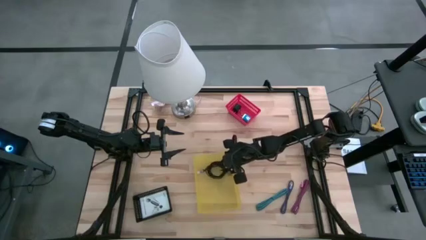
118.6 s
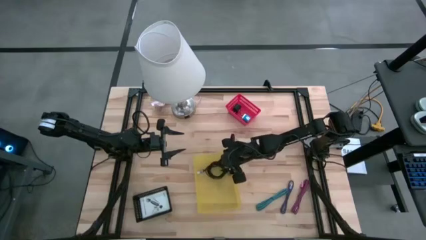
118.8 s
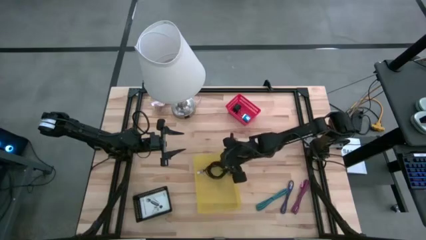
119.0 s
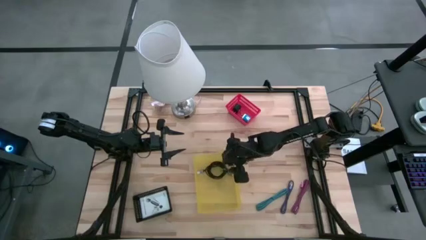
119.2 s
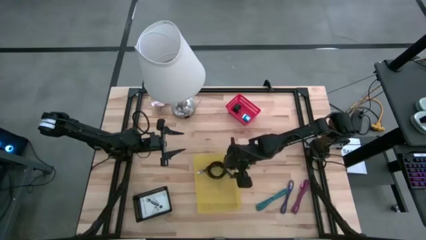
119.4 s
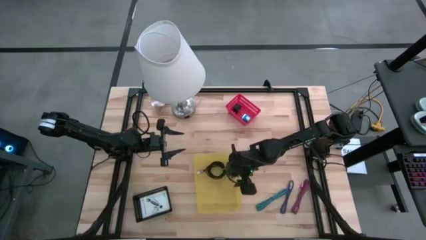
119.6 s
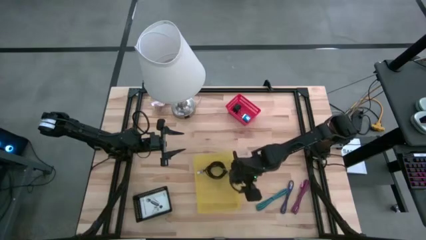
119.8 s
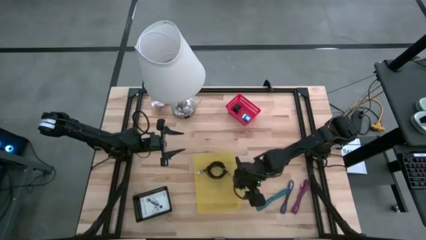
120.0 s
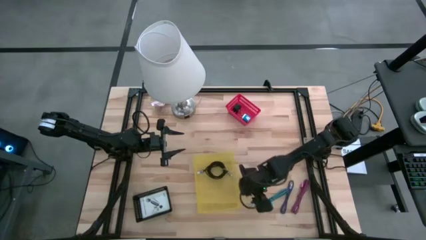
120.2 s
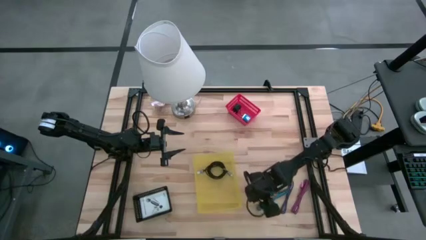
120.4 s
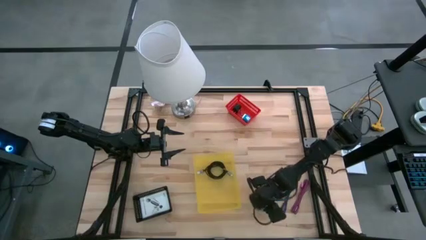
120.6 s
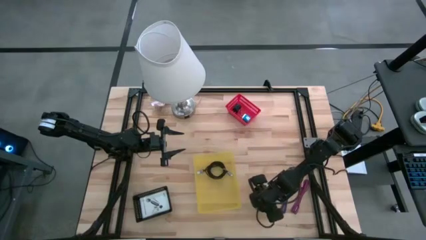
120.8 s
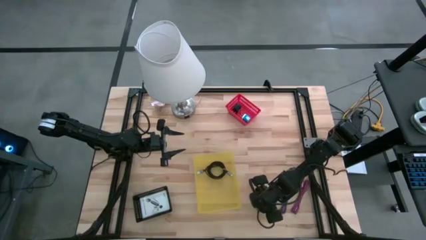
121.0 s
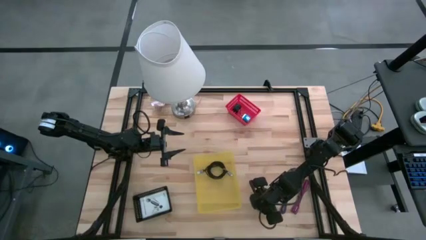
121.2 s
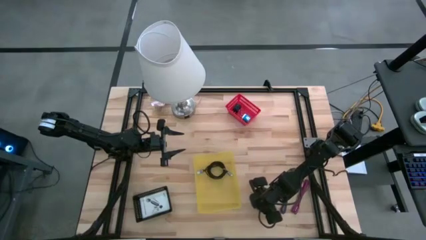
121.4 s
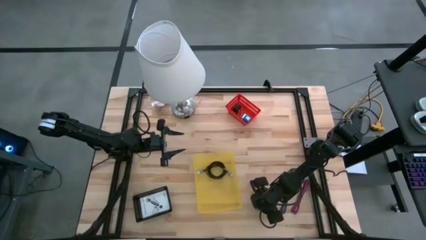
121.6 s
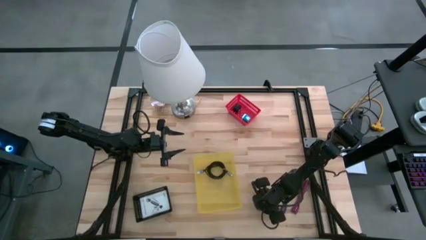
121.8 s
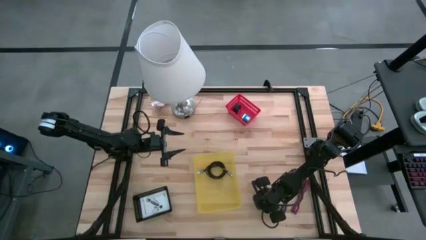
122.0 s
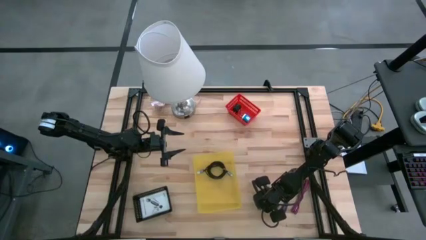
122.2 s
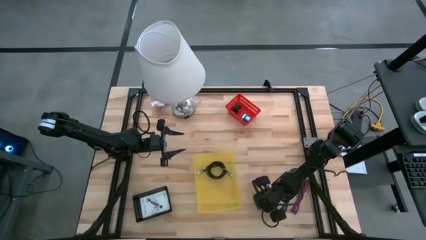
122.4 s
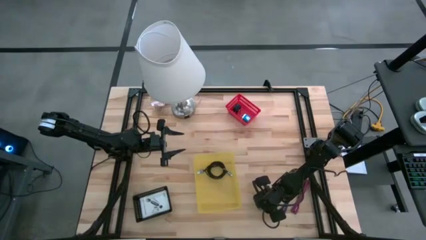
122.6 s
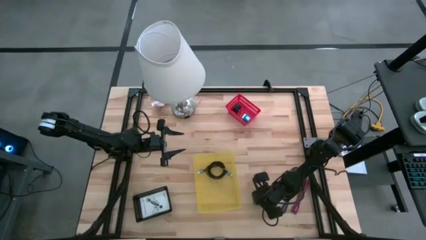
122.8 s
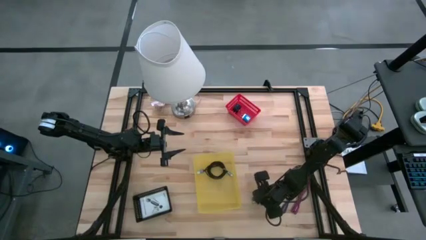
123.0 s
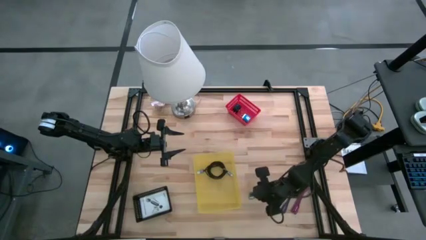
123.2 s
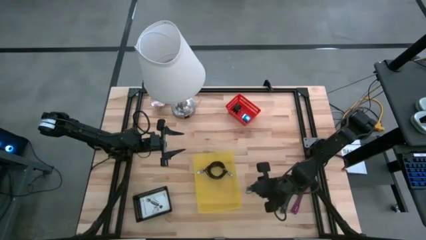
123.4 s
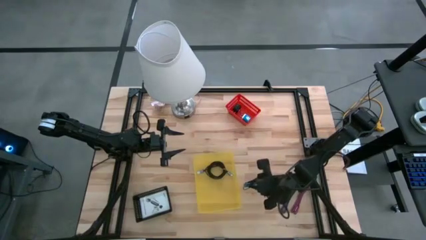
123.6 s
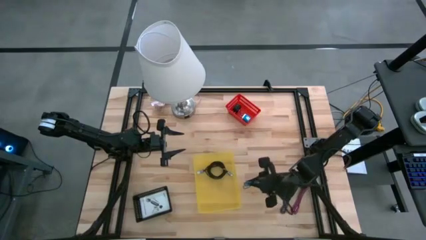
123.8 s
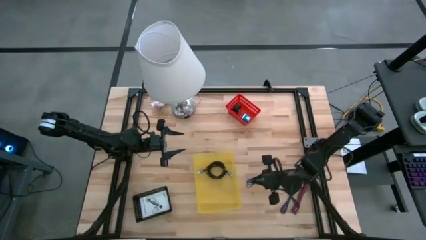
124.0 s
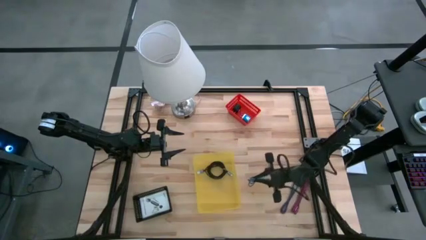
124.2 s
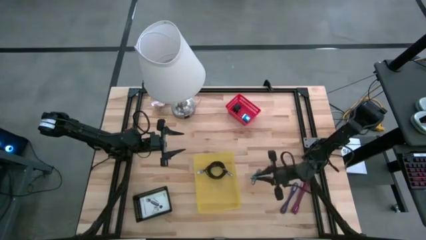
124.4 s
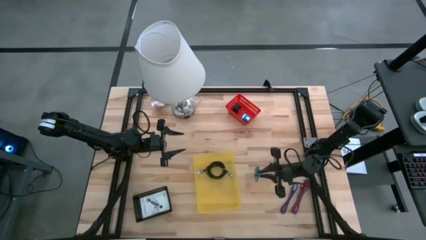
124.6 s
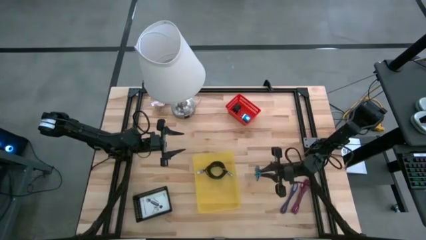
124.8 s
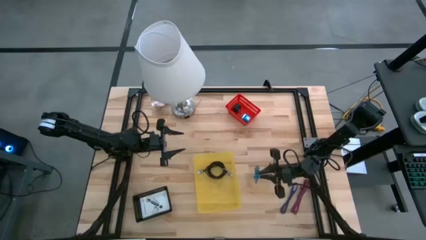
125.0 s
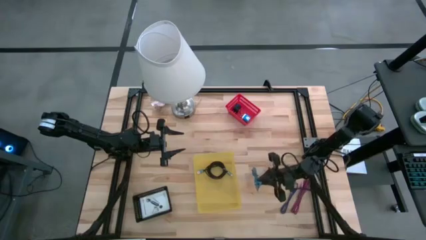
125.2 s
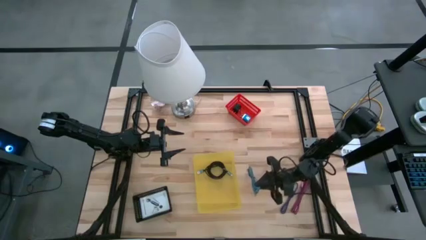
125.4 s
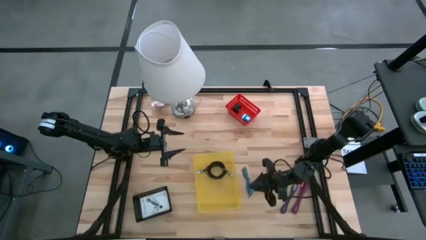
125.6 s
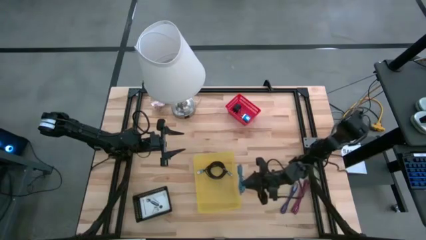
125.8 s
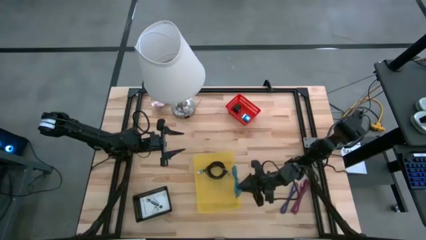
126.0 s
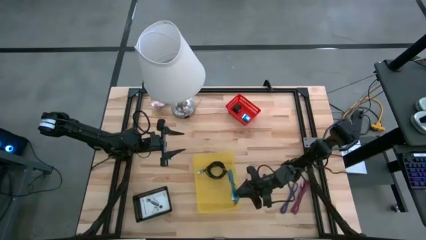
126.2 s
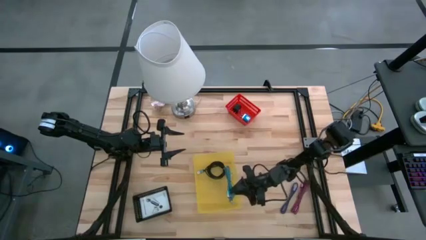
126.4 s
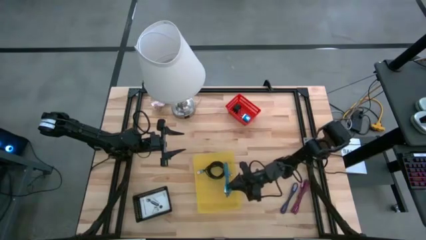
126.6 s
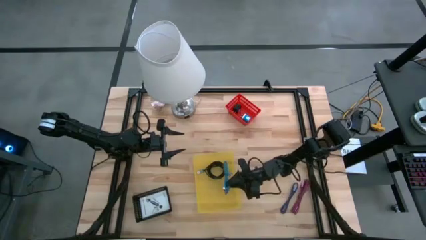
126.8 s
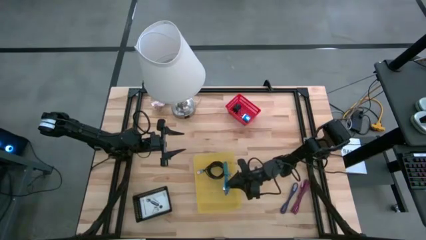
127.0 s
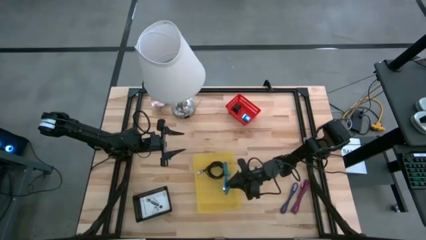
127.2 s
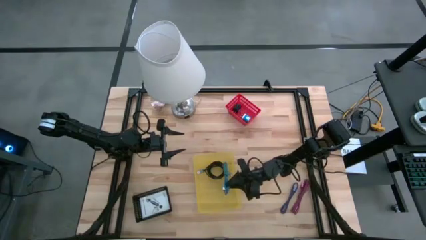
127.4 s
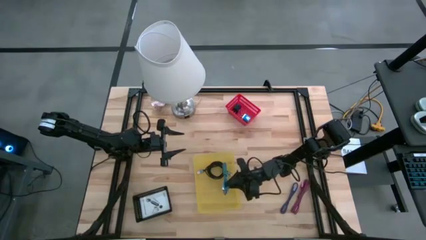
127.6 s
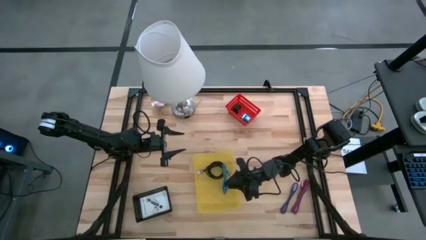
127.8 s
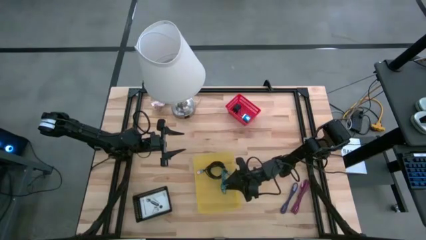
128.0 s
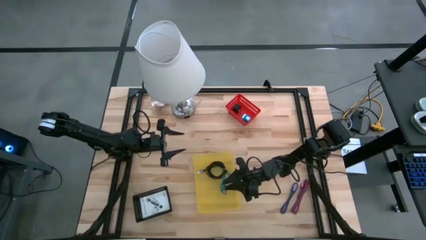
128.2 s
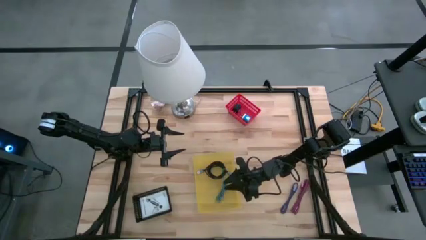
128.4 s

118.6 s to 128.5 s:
Task: Pick and place items into bin
Put the blue charger cable into the yellow bin

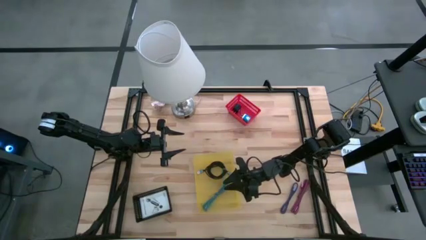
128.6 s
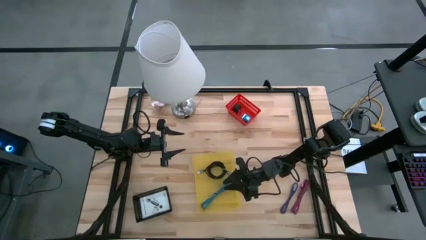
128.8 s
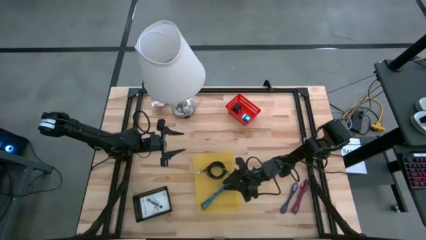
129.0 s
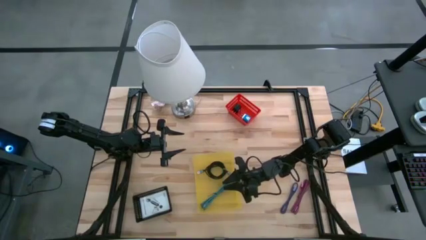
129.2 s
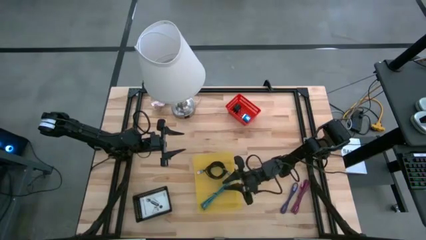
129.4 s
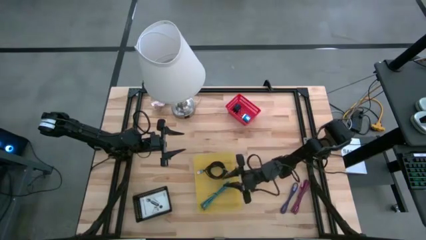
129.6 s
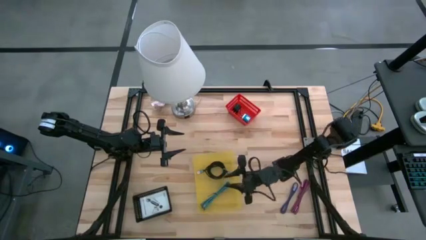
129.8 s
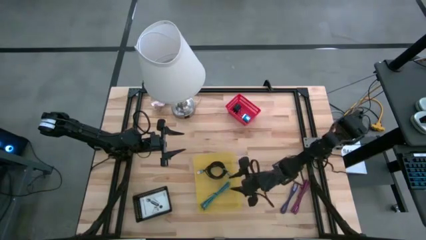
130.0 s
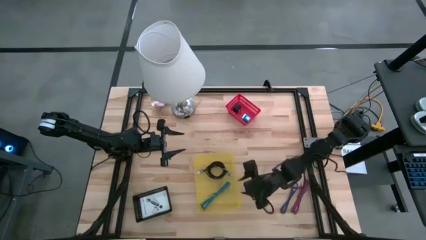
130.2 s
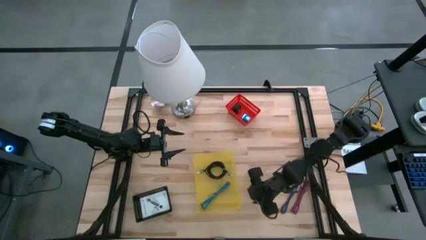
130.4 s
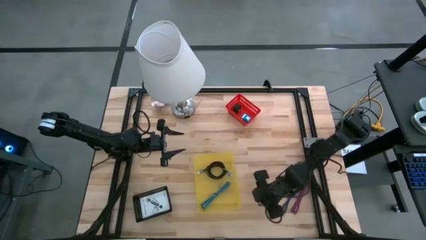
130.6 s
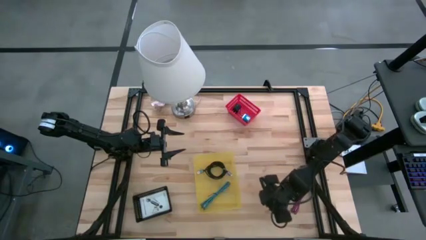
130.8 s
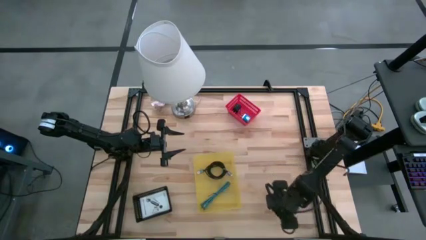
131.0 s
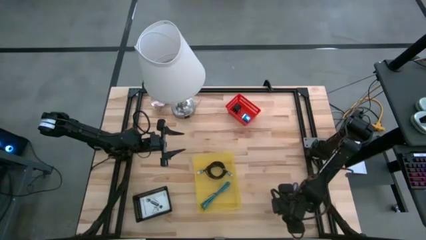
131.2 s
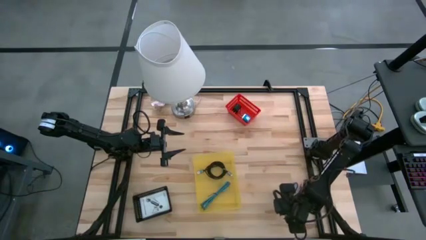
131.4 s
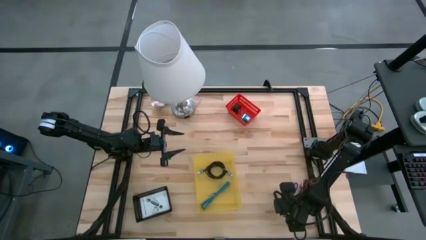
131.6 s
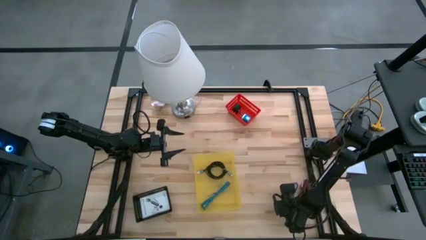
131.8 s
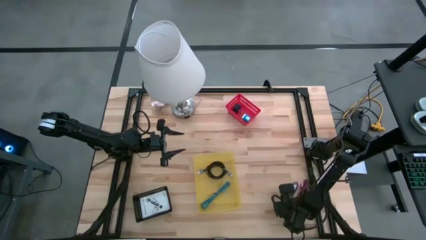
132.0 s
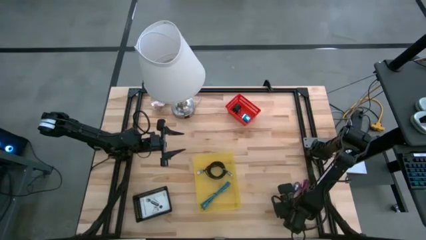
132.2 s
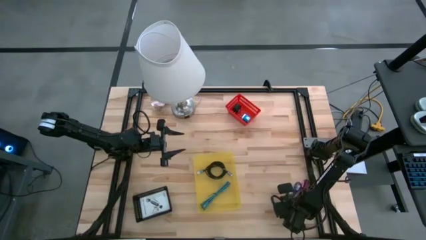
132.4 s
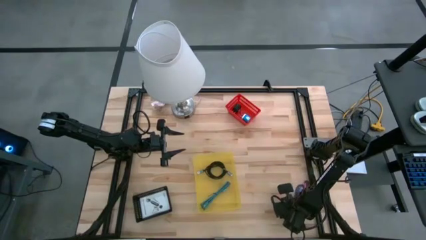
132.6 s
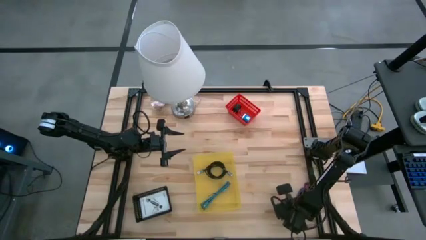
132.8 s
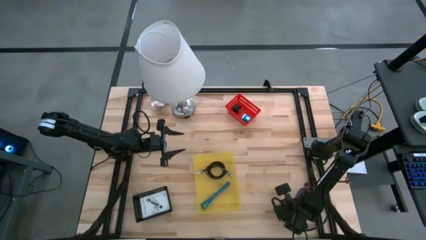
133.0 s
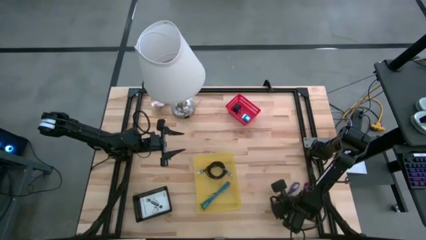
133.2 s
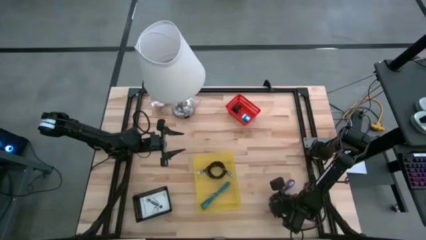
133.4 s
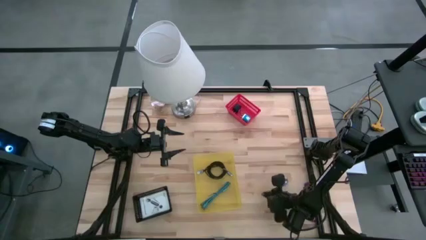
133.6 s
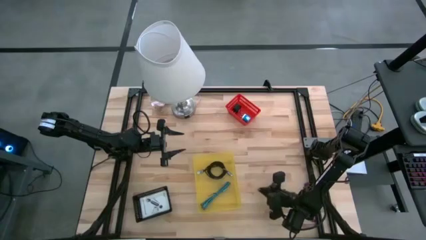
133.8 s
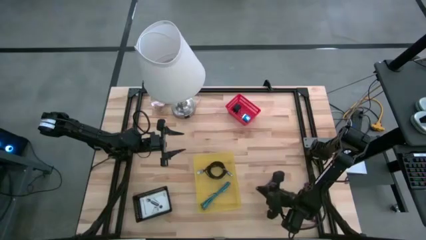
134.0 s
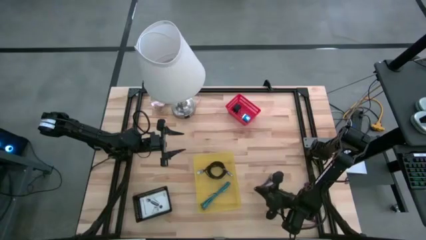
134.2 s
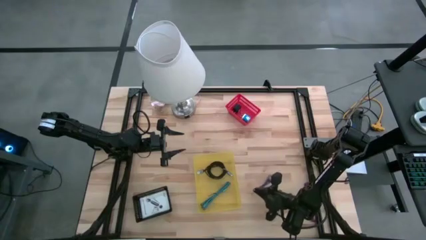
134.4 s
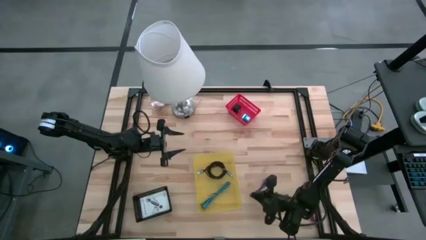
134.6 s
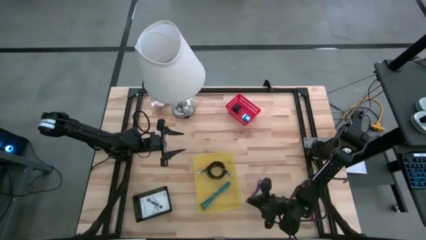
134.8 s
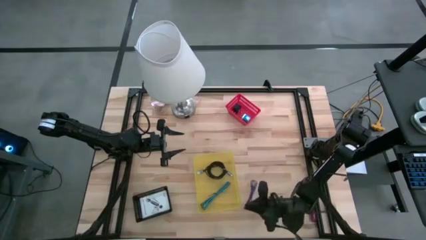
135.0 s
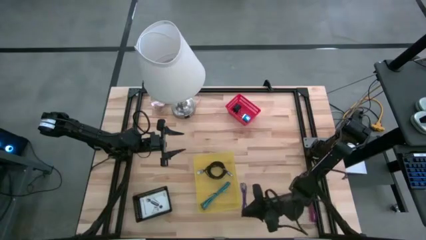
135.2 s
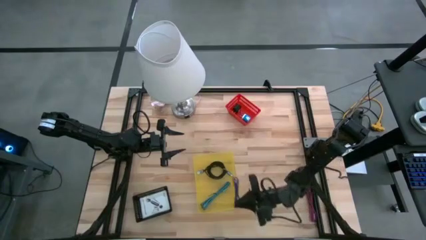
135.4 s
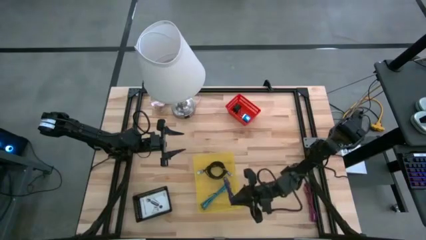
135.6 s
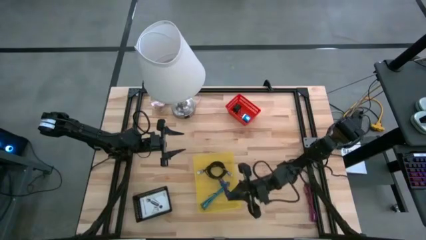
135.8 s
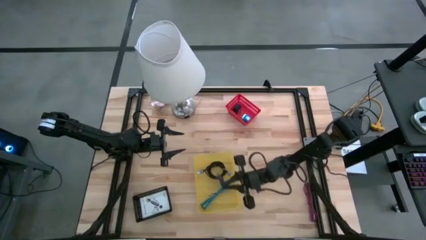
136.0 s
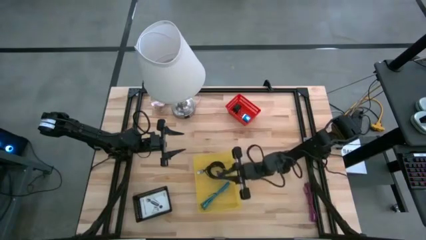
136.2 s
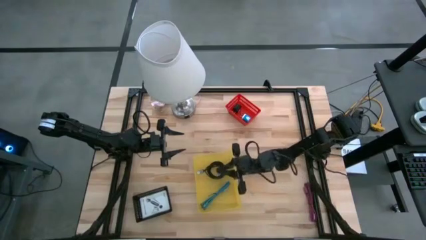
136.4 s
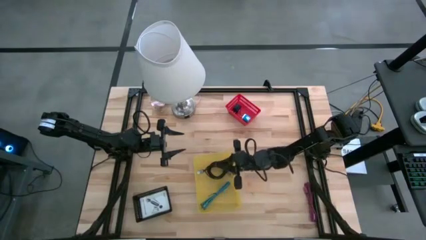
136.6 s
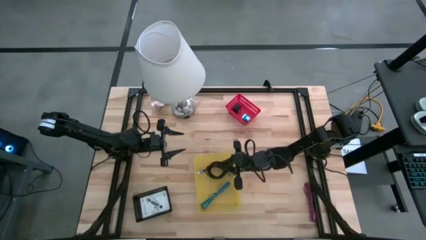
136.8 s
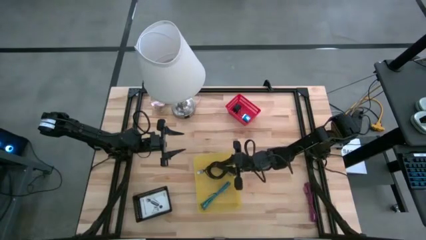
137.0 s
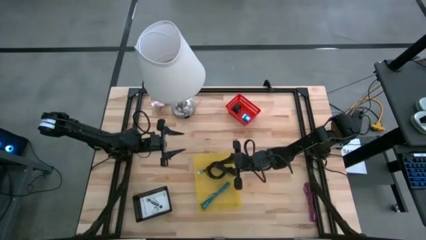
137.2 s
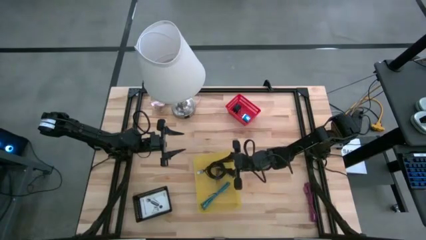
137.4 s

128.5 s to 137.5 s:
Put the violet charger cable into the yellow bin
